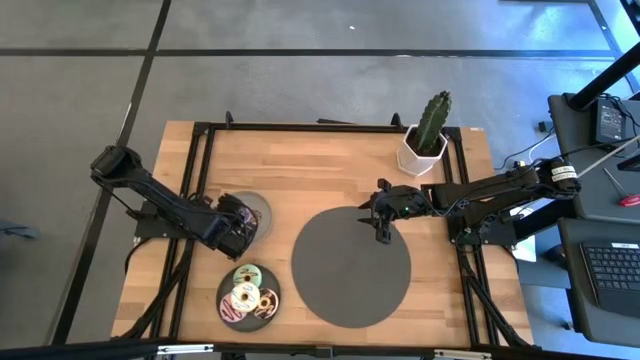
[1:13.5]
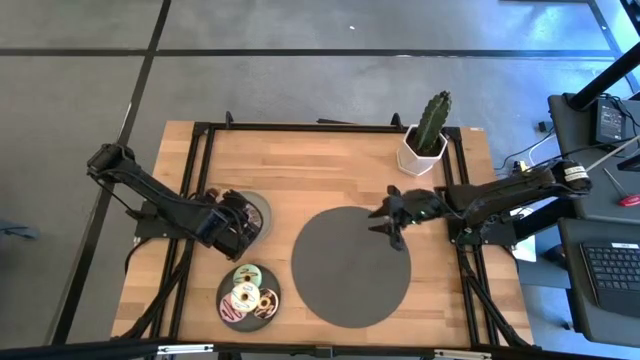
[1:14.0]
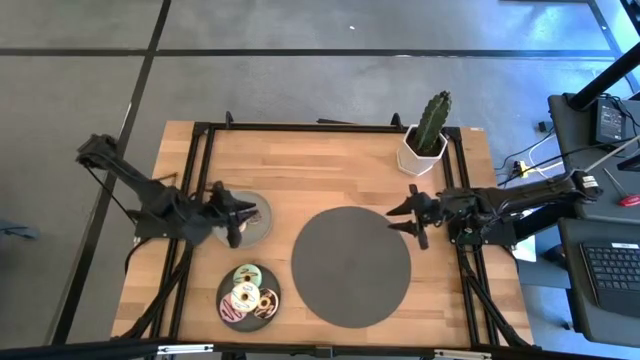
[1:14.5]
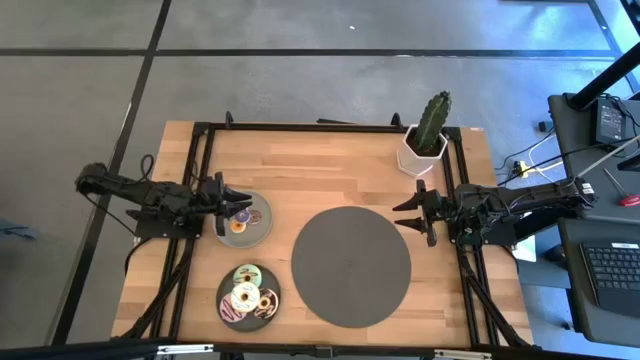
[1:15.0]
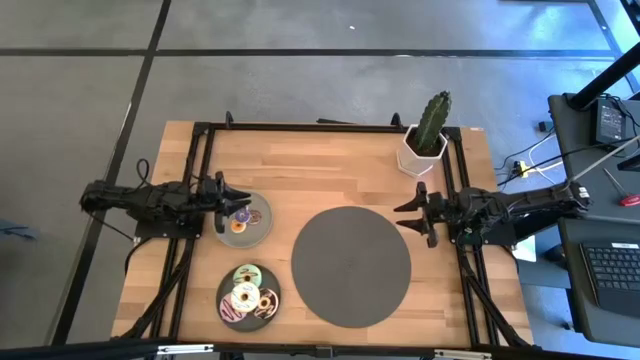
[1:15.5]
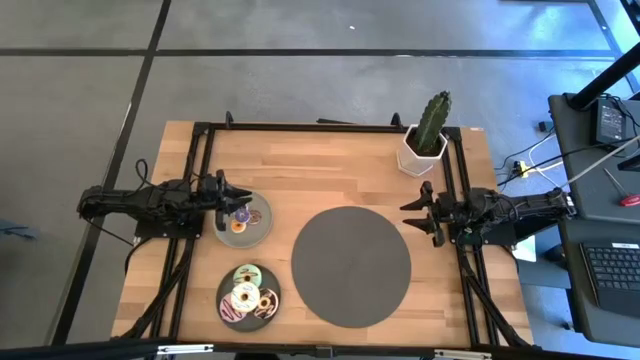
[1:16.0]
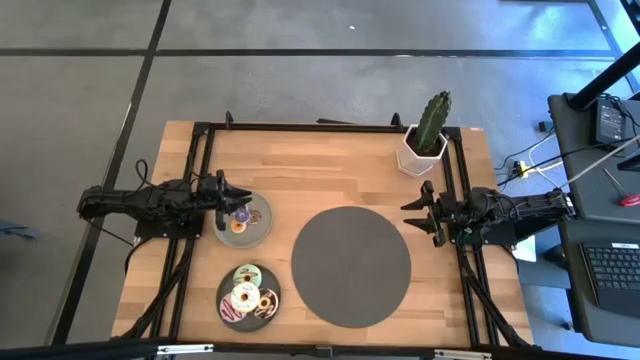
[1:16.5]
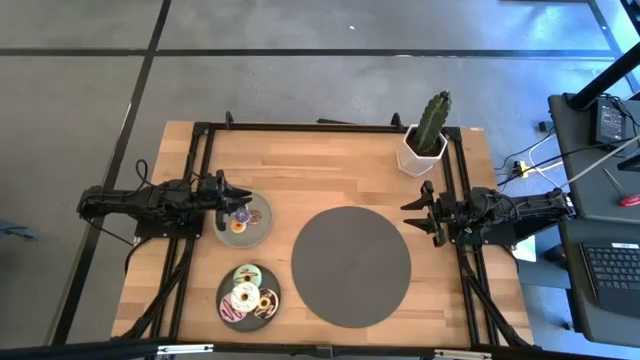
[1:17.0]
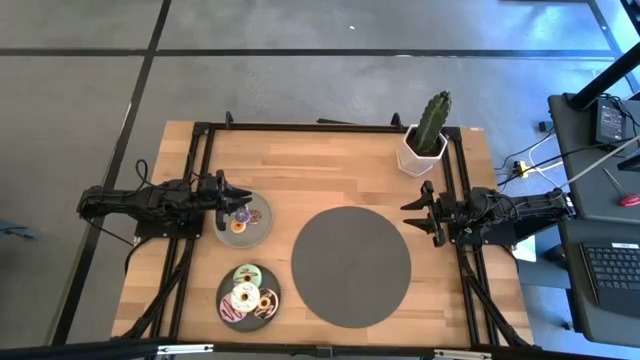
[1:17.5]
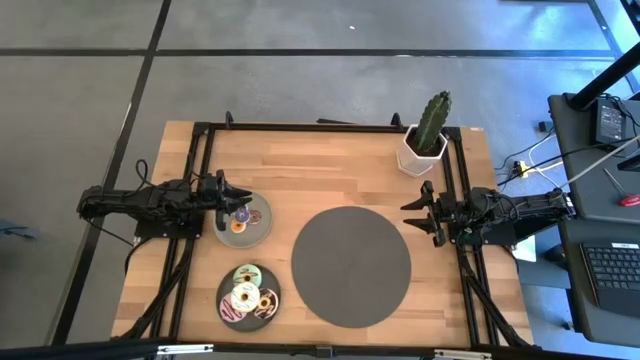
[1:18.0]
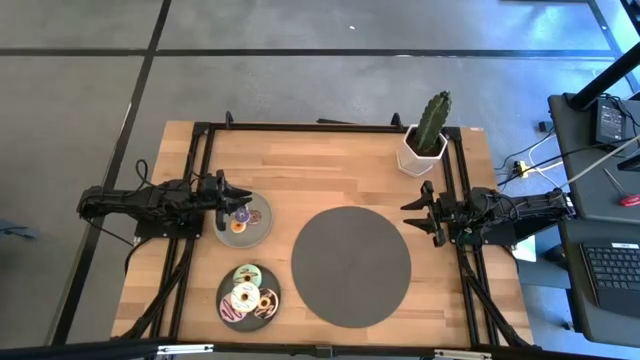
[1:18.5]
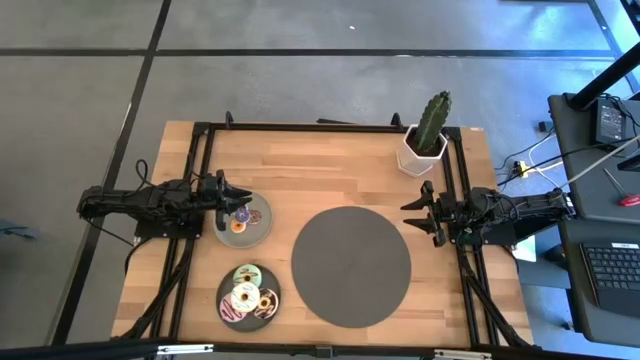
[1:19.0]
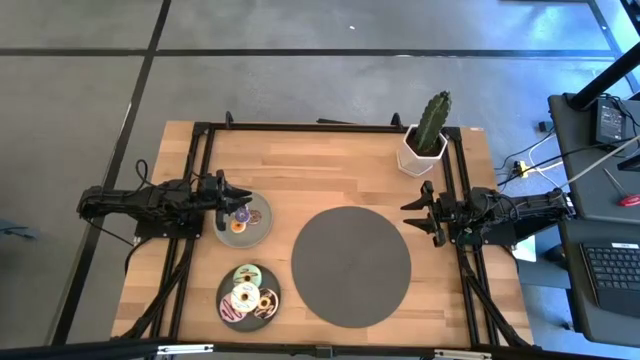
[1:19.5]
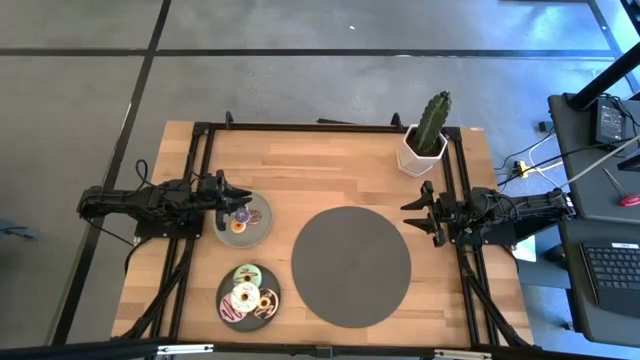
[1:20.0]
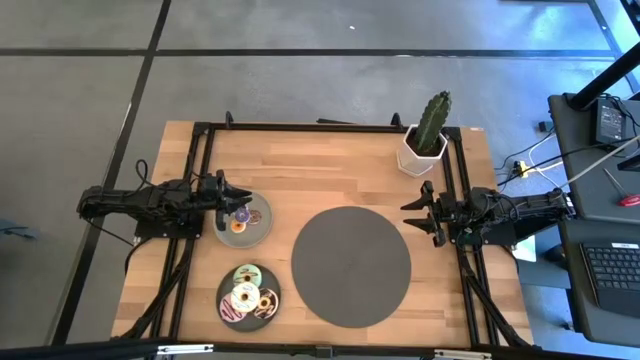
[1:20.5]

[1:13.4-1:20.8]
Task: Pick & Place donuts
Return to Home Position

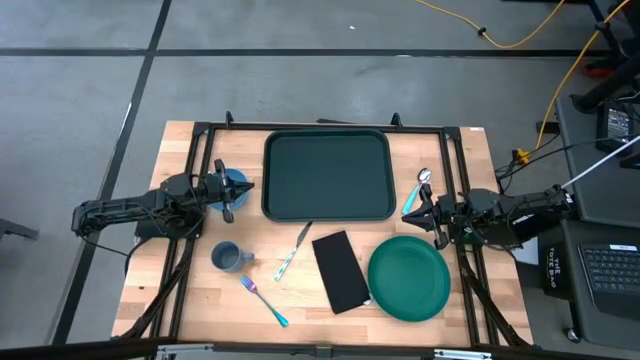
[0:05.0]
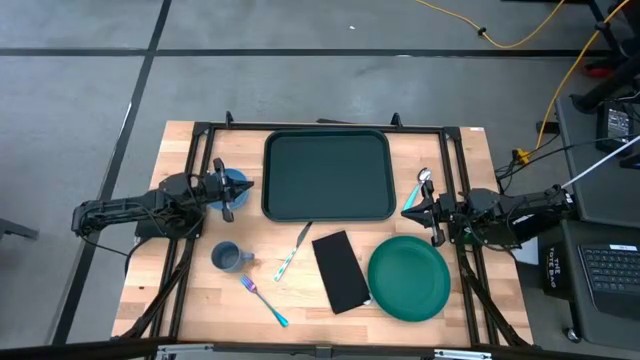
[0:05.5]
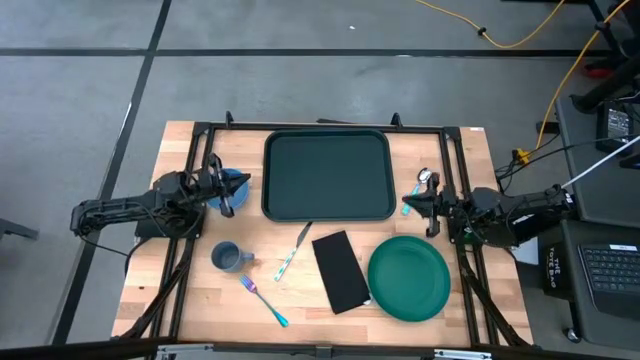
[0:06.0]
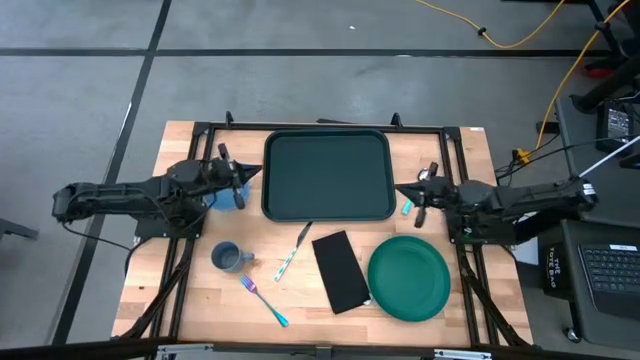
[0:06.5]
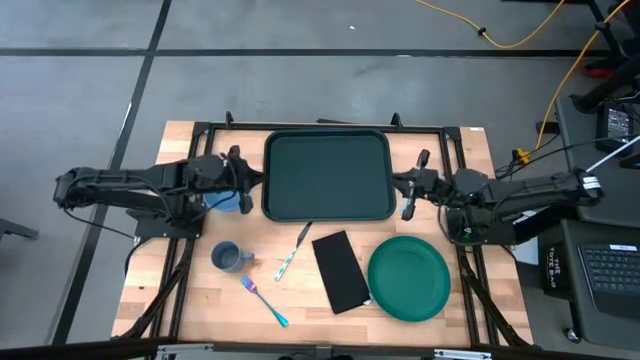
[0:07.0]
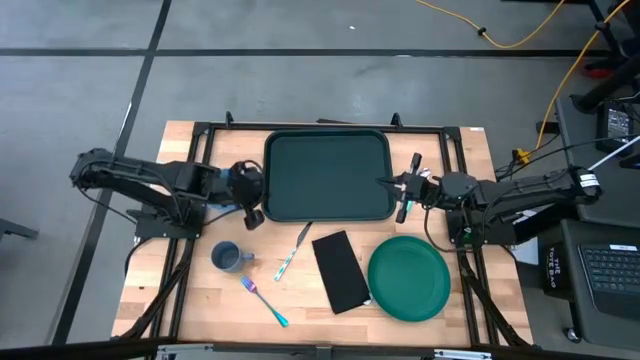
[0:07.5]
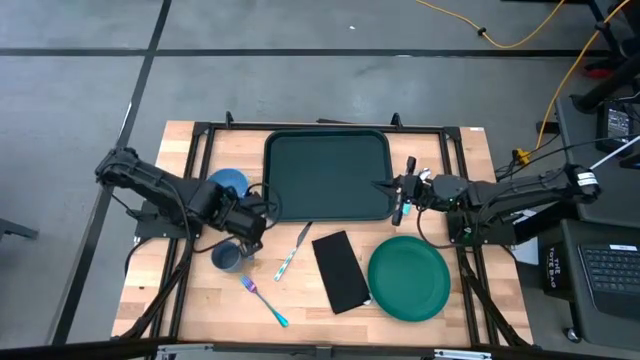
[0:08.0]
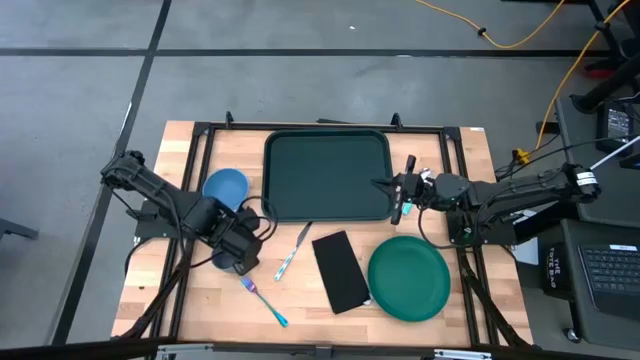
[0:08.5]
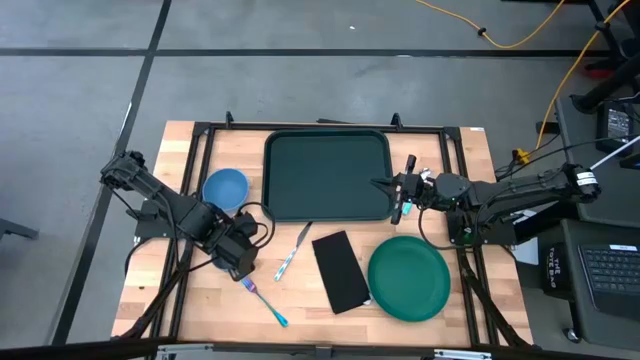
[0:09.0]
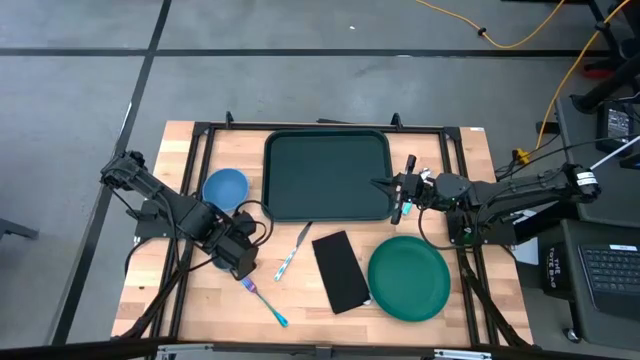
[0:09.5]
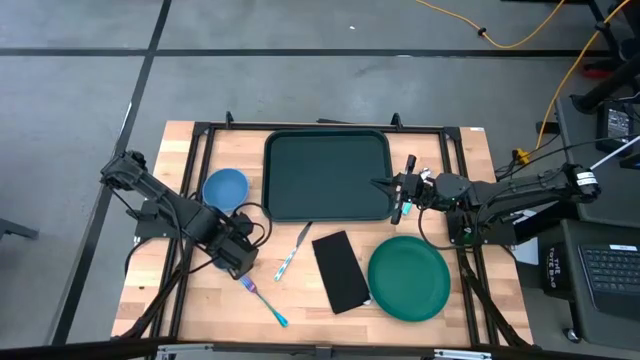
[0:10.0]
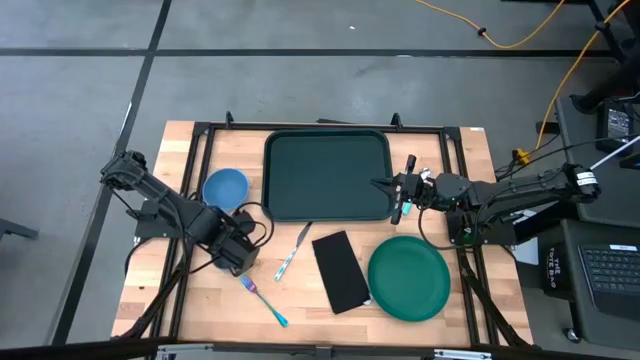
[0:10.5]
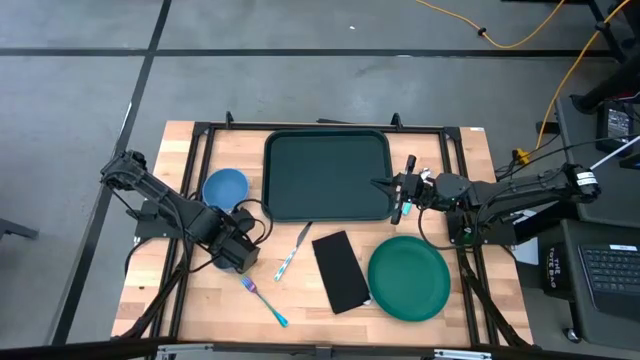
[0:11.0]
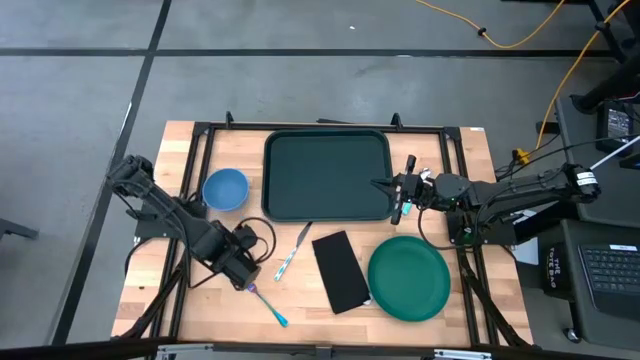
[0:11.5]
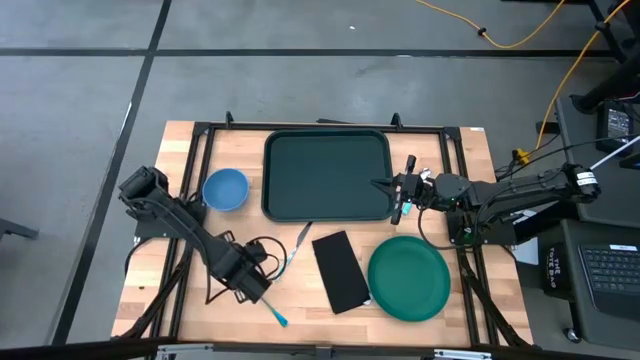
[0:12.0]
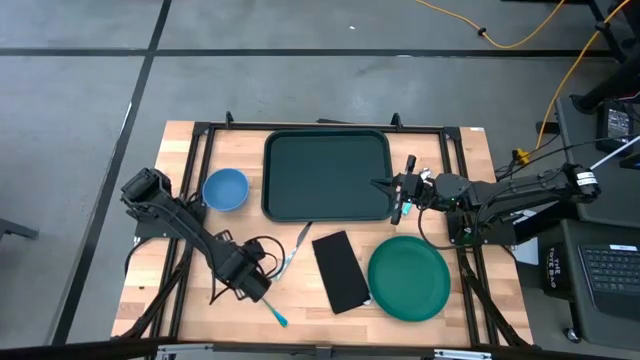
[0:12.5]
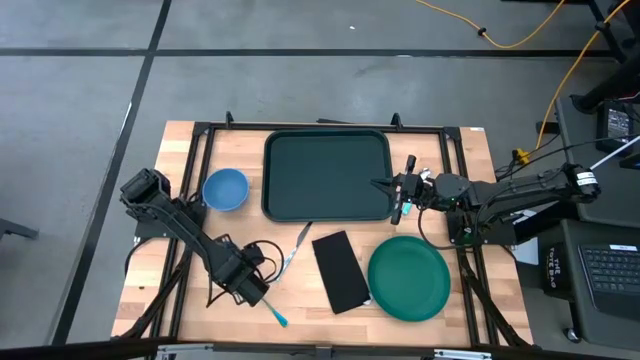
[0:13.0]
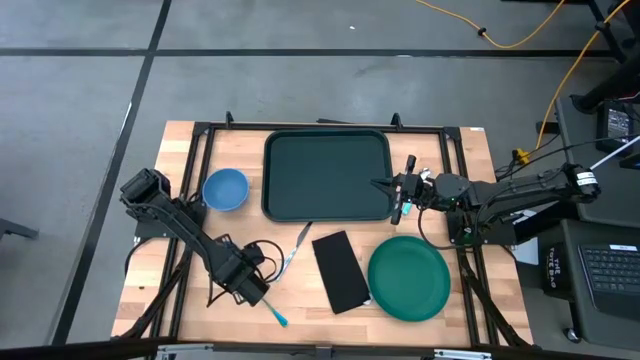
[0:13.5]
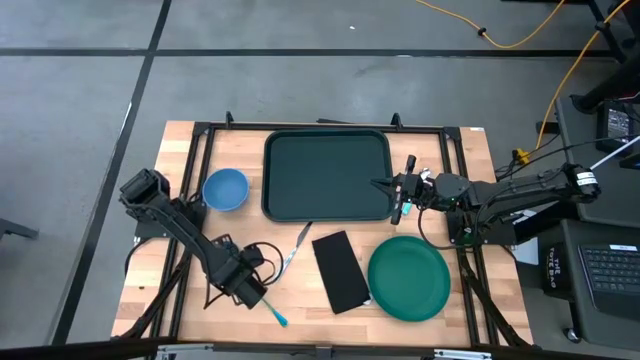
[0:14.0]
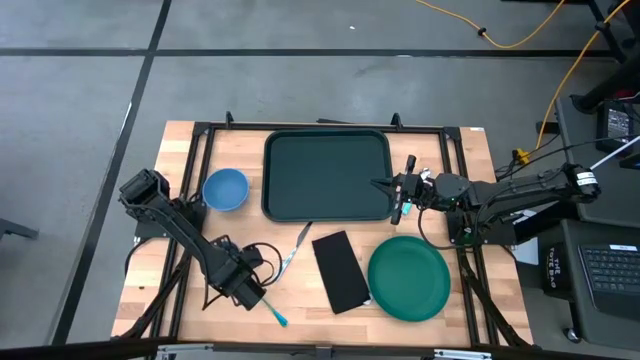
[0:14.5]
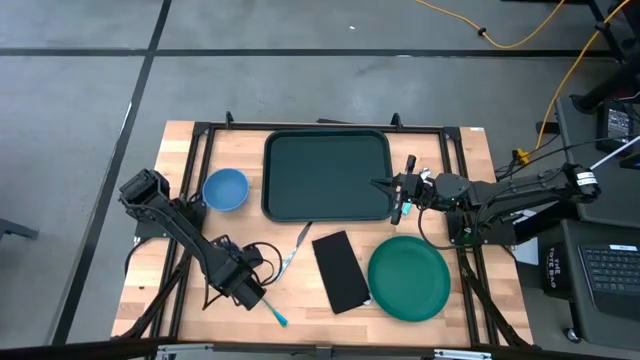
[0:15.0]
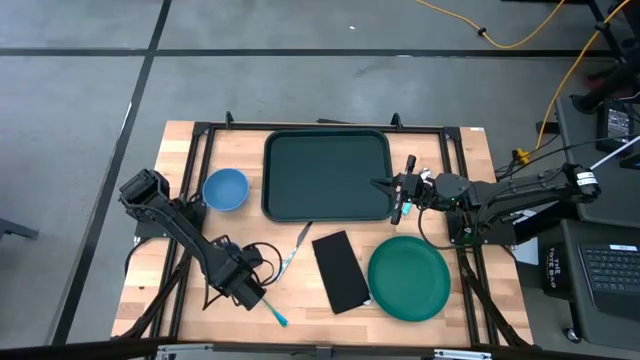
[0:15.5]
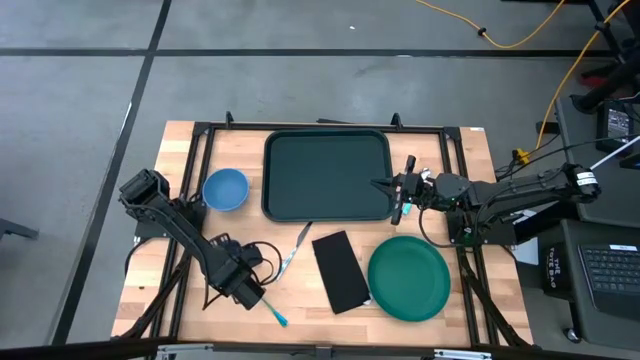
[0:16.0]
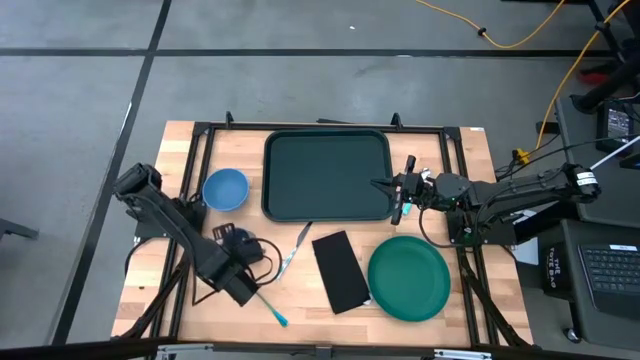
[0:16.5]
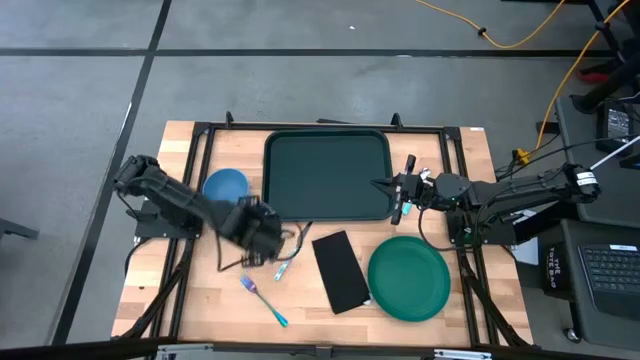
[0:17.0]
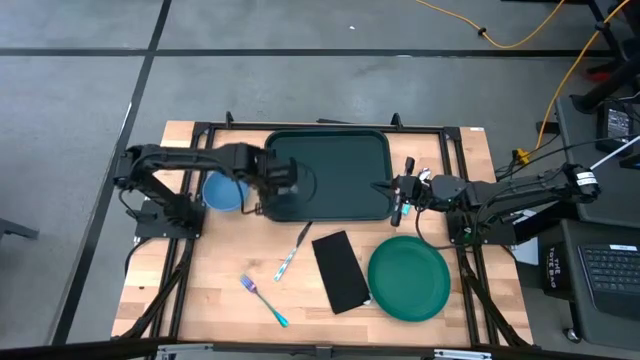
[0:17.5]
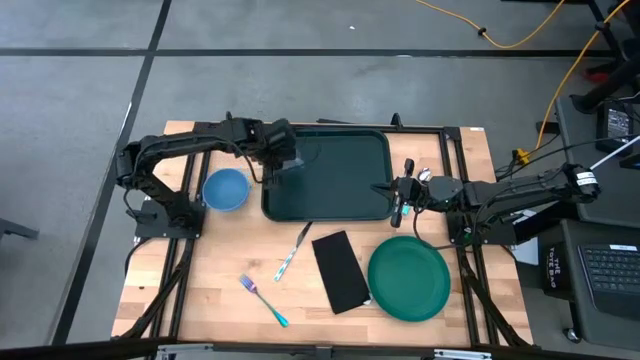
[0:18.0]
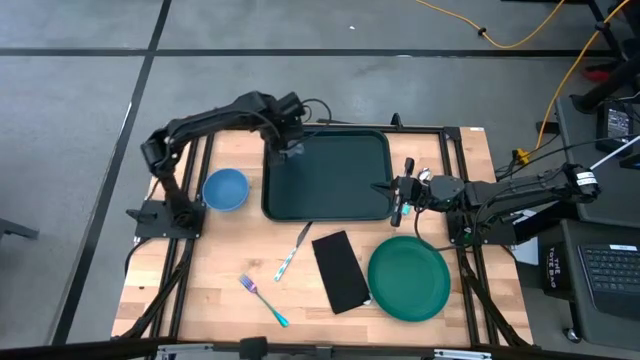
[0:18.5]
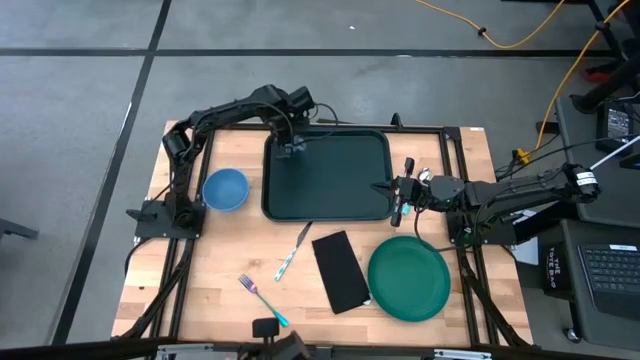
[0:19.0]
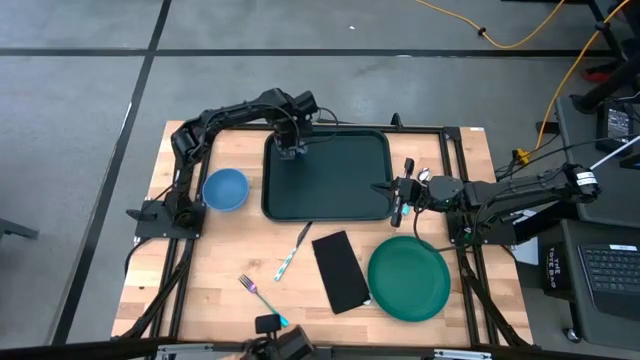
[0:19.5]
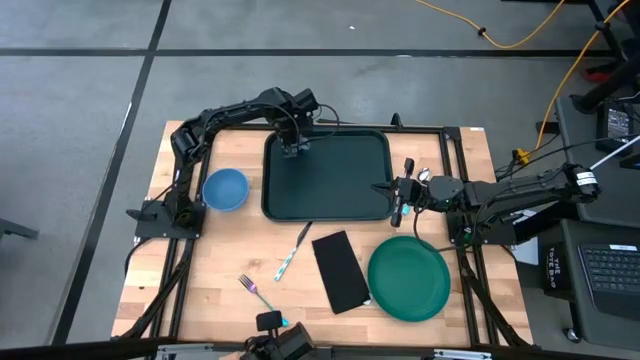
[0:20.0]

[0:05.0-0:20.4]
Task: Set up tray
Put the mug on the top right of the tray
